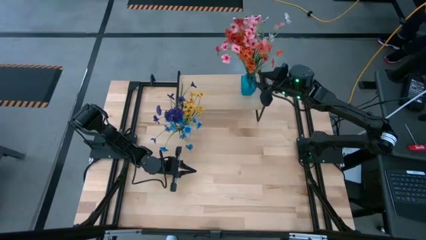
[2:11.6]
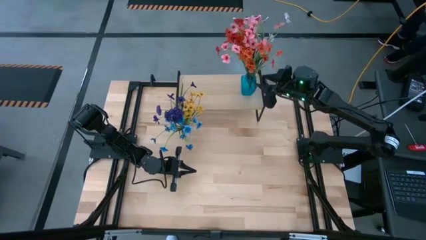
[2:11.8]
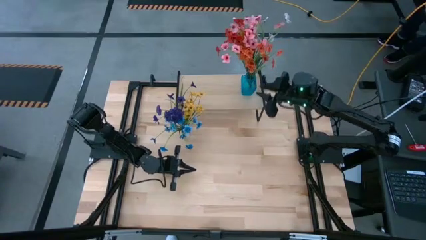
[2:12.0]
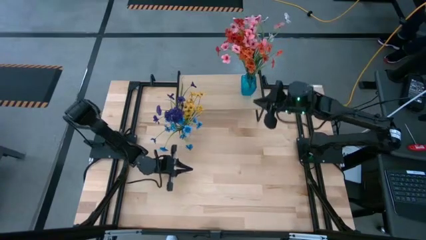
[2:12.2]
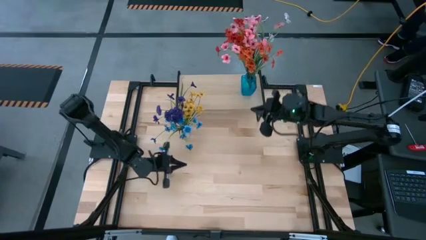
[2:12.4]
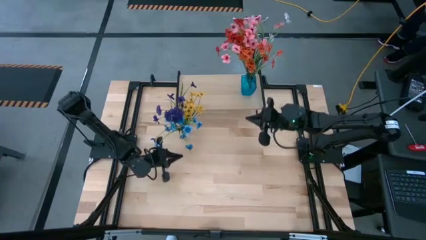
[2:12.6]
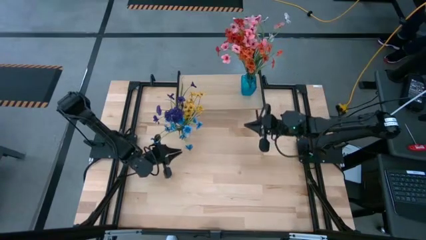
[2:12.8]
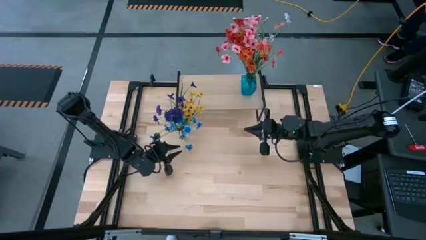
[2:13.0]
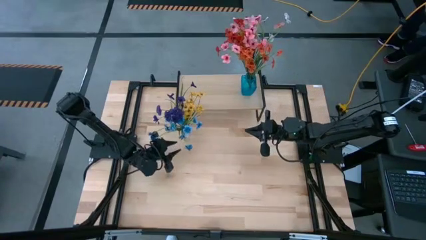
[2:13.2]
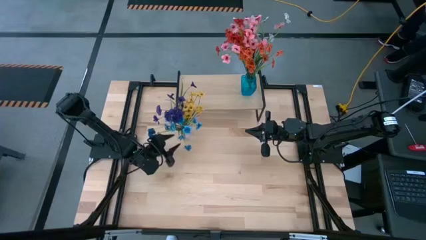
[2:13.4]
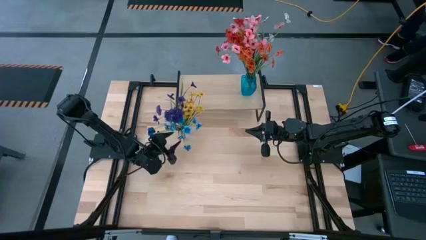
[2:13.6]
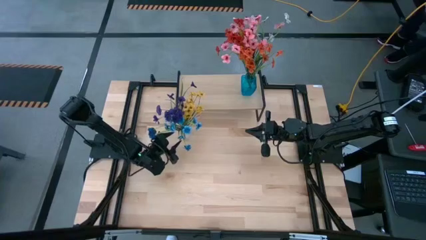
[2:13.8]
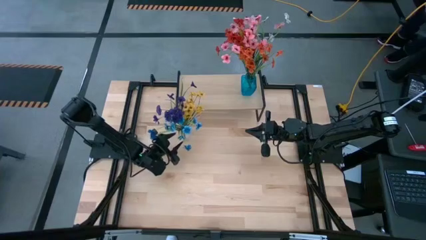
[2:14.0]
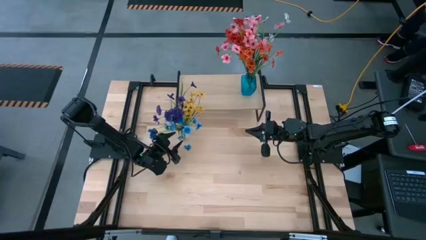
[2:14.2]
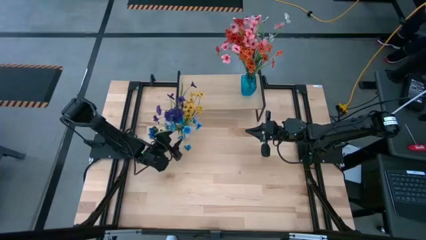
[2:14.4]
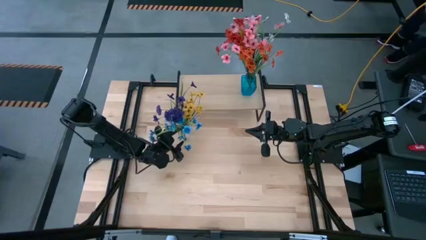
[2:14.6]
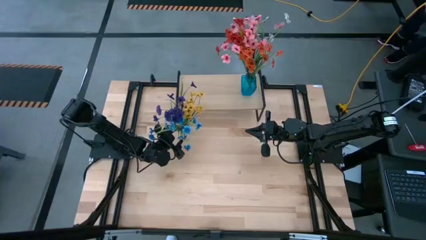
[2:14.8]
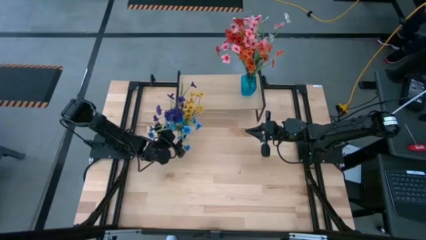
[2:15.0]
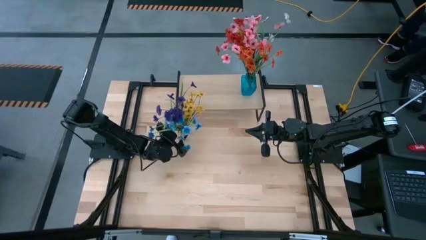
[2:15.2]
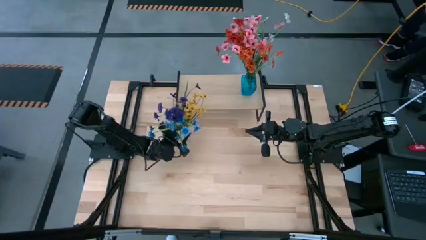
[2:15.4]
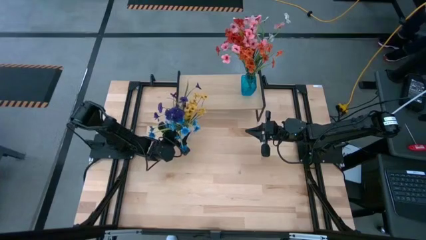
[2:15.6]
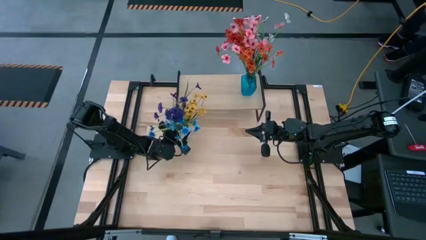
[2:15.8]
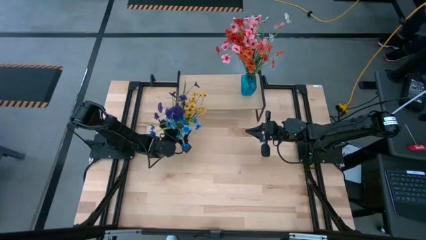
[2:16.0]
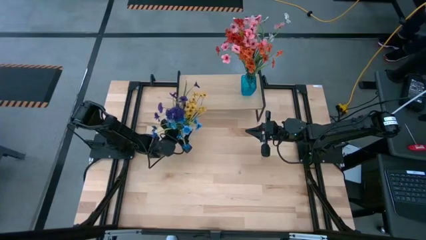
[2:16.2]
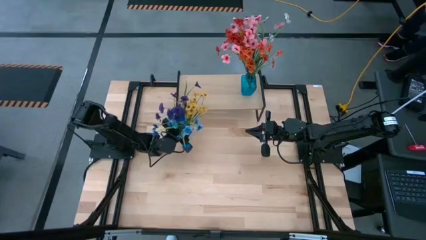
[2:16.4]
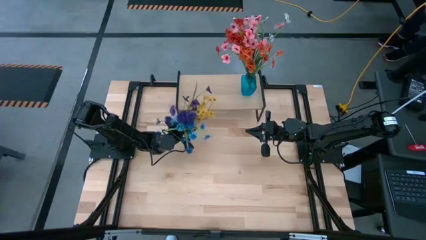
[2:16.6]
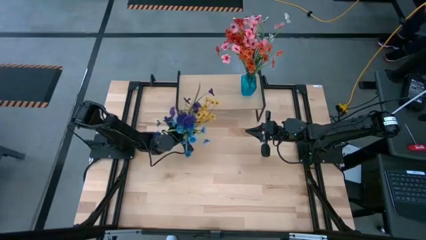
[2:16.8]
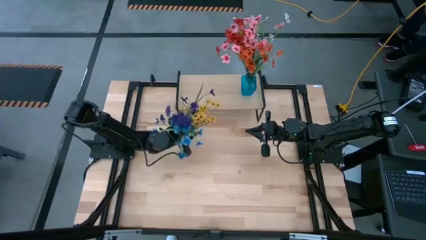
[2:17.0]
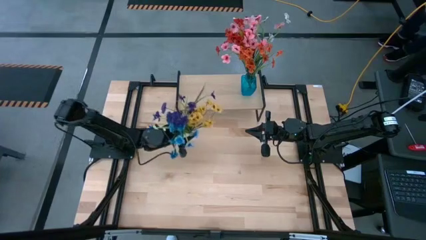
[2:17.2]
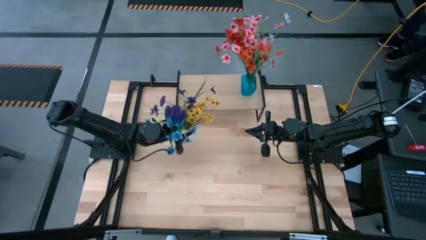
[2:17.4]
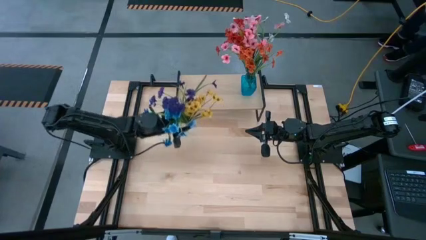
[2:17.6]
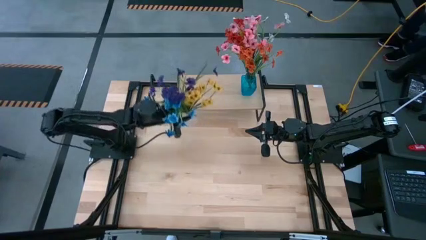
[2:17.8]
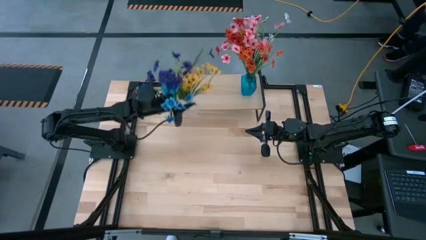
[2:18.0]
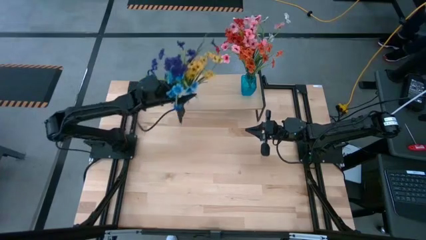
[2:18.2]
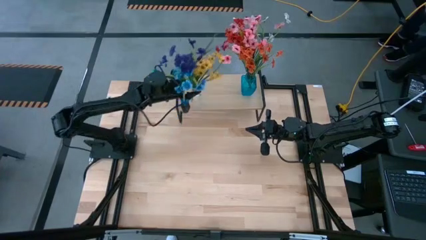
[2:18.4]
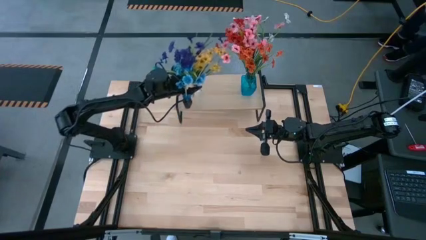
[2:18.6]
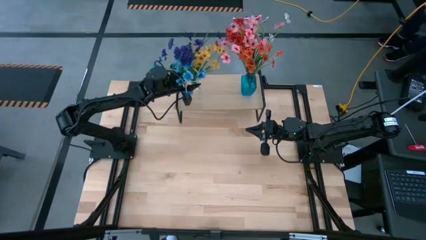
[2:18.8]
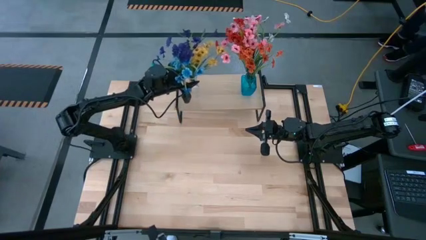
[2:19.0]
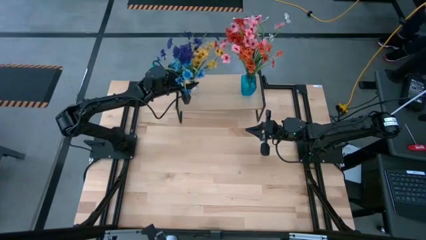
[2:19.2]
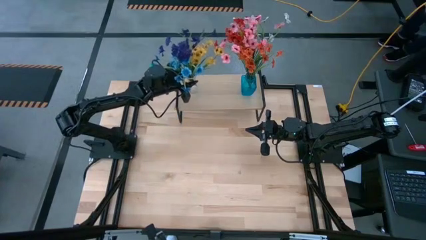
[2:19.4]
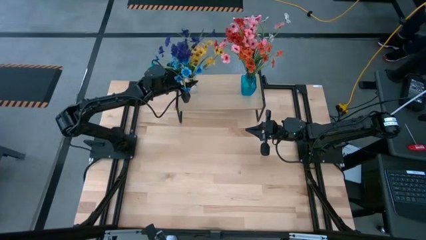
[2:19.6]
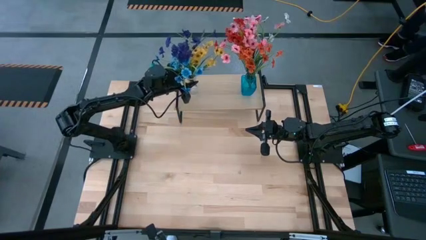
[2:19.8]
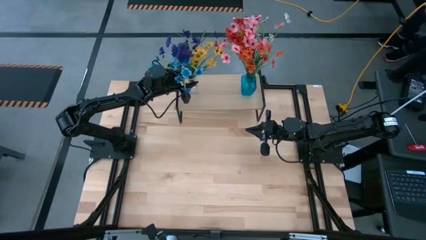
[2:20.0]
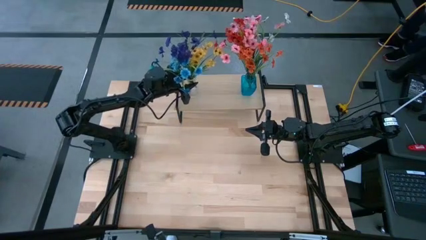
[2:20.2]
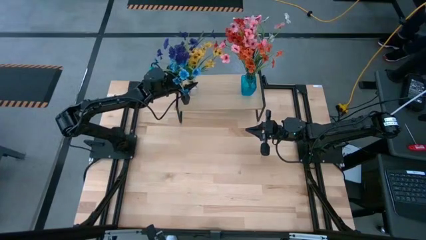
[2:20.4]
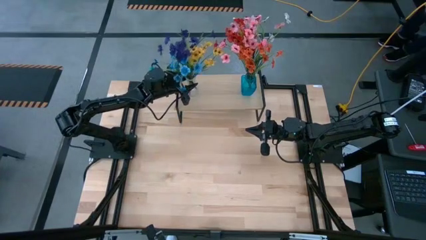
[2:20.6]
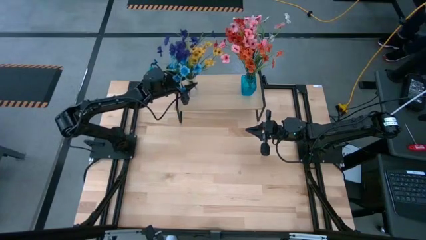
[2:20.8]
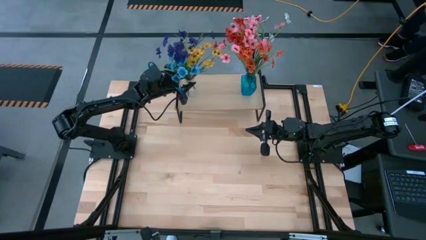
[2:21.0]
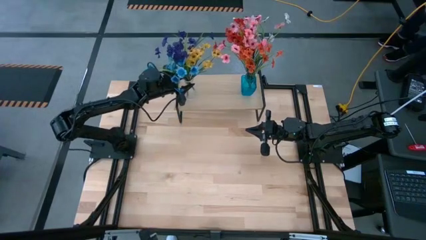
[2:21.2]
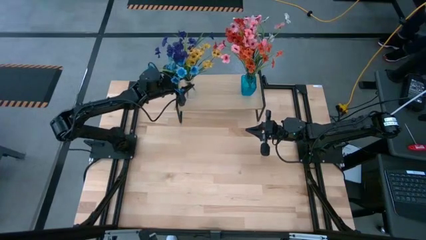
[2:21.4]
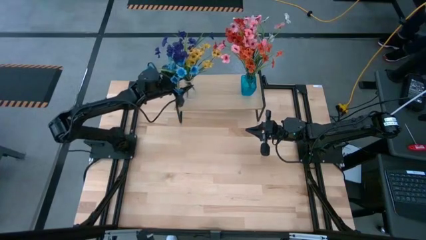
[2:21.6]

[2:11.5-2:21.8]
Task: Pick and place flowers into a vace then onto a shelf
Put the transparent vase on the shelf

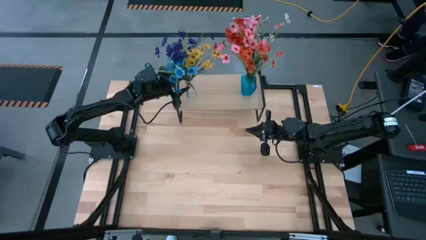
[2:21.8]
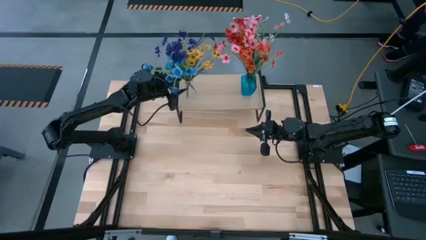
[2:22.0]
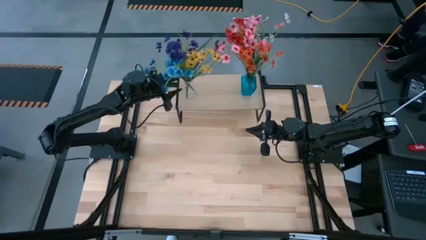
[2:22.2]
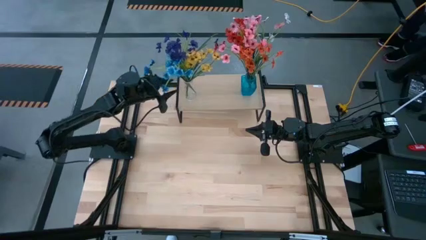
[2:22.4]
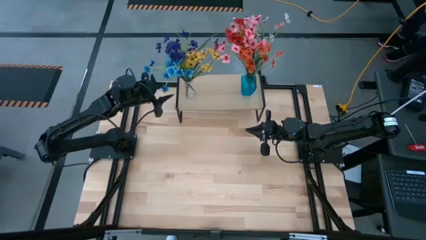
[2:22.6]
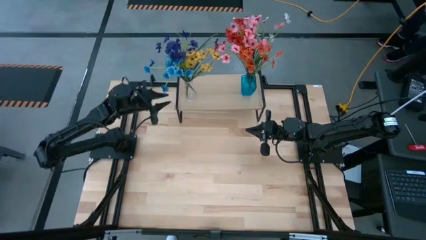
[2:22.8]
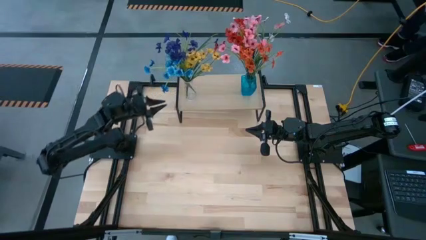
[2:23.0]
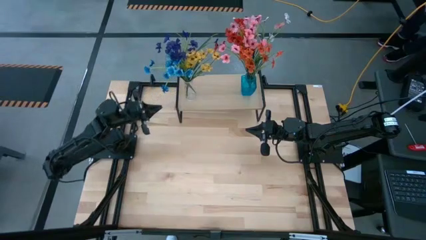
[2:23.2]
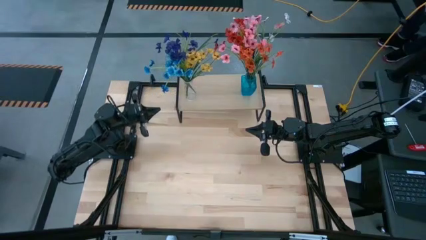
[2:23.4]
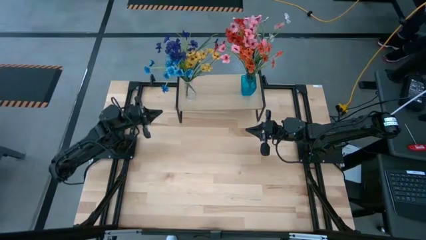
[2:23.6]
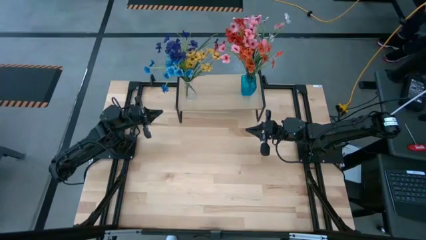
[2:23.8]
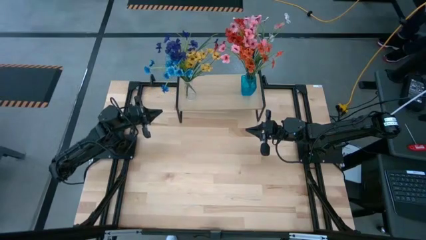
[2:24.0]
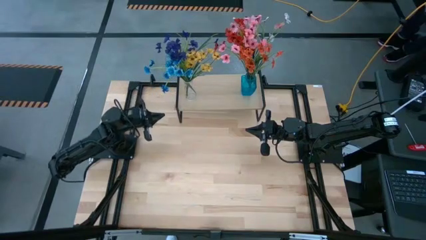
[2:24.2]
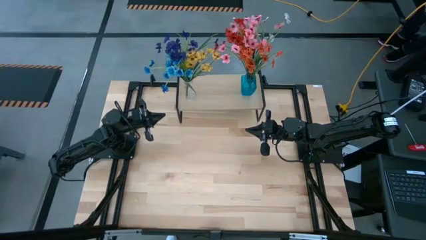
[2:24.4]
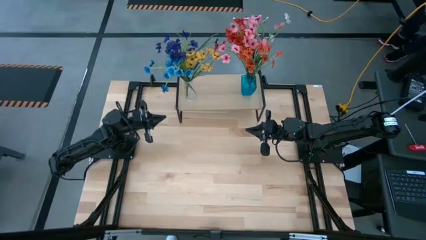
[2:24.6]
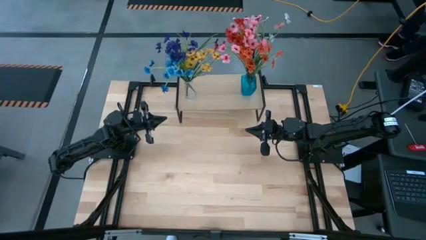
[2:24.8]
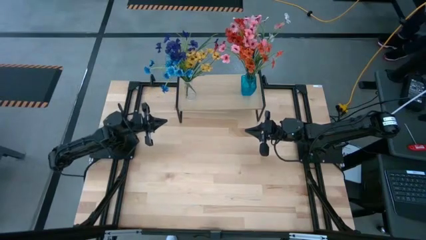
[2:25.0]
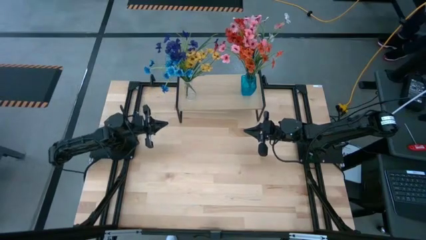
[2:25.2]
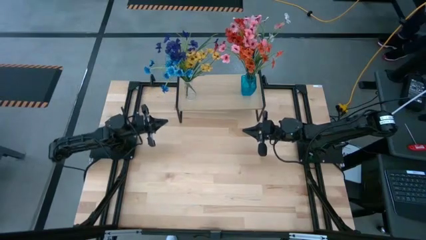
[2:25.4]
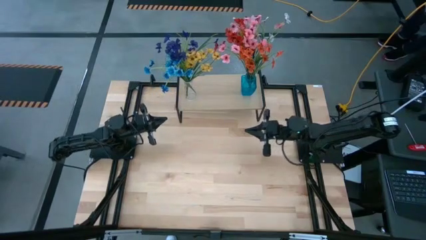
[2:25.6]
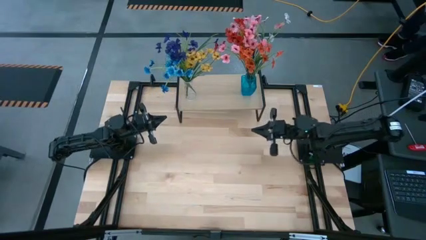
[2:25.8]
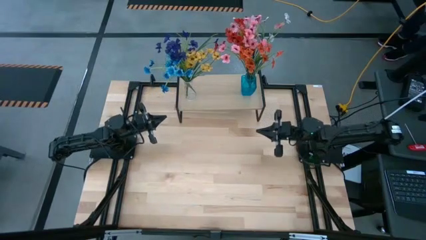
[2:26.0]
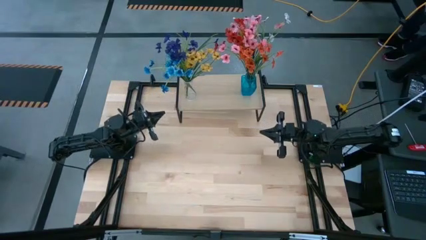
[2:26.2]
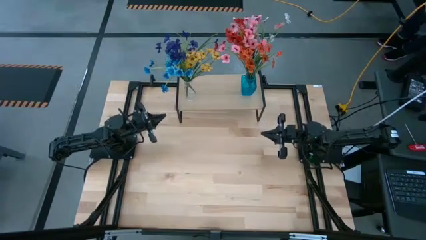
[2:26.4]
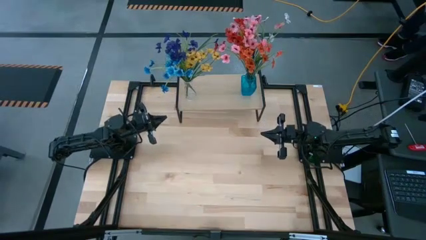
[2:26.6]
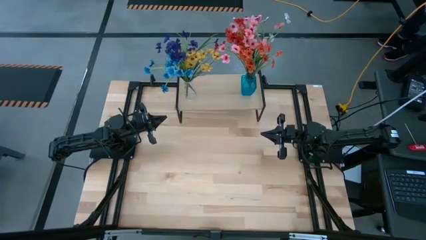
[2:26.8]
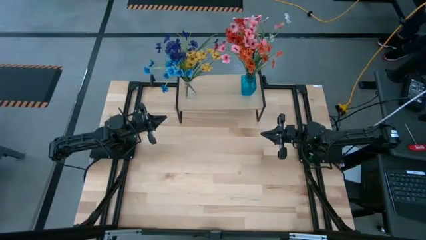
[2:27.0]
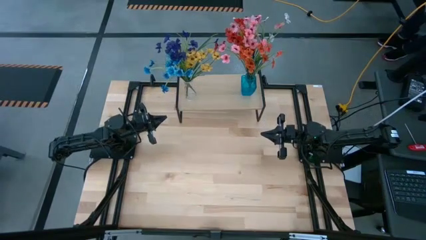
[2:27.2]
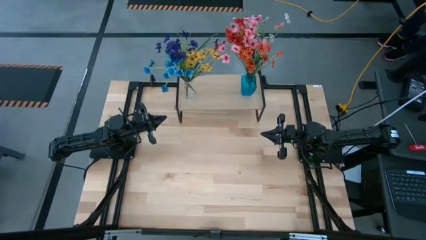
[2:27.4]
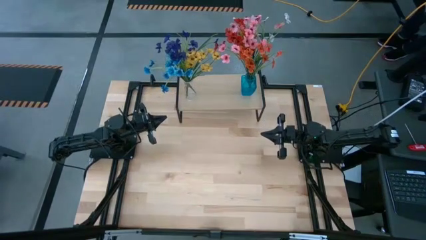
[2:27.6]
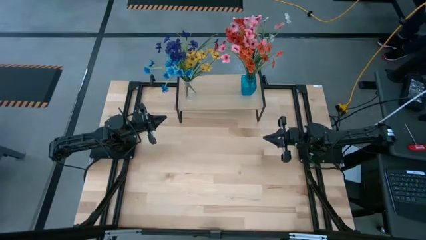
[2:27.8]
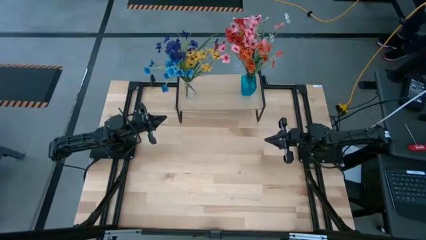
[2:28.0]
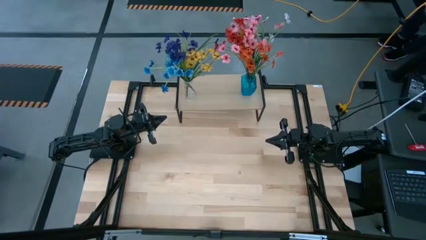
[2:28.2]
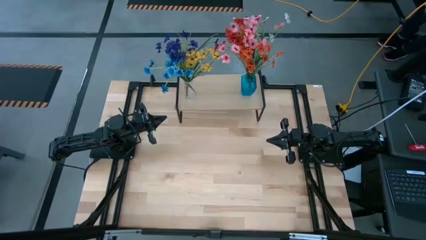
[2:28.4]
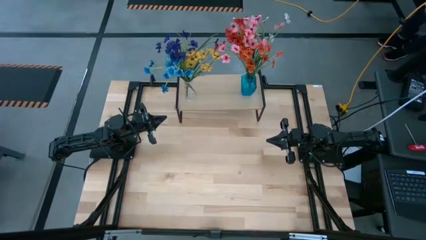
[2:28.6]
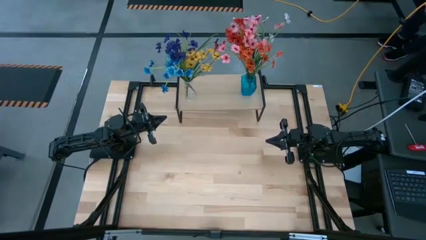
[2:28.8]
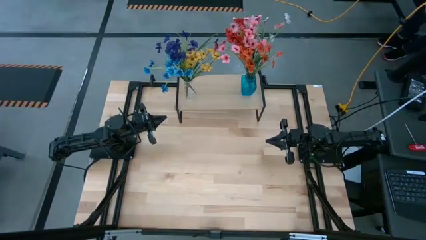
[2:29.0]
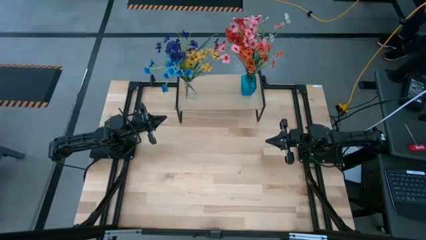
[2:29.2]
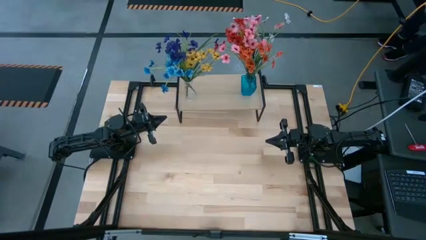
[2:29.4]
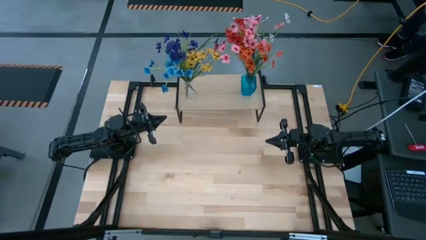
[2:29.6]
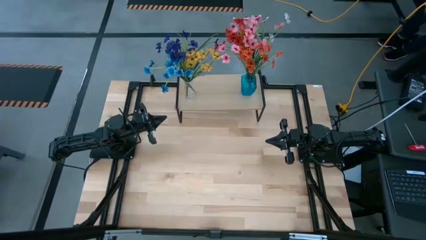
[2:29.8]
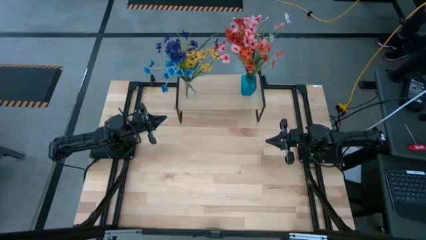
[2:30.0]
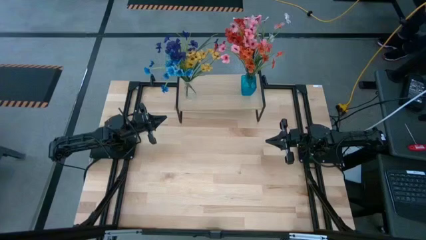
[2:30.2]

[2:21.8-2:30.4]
Return to Home Position
